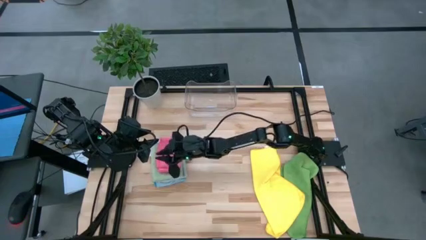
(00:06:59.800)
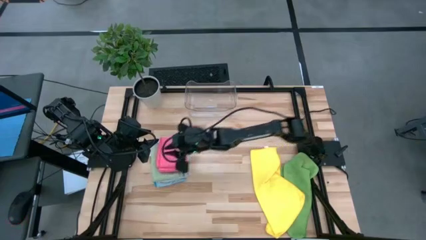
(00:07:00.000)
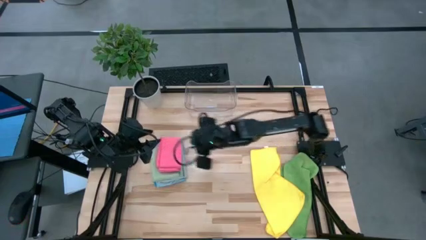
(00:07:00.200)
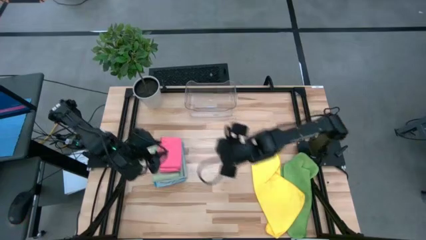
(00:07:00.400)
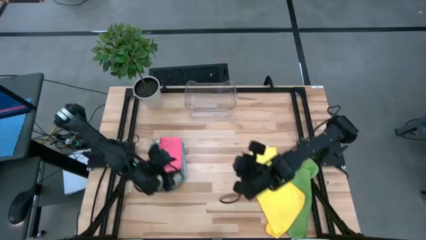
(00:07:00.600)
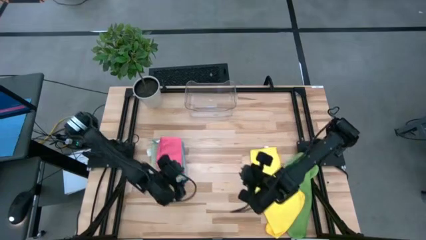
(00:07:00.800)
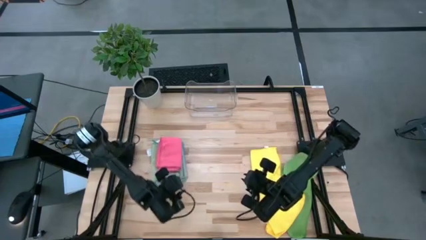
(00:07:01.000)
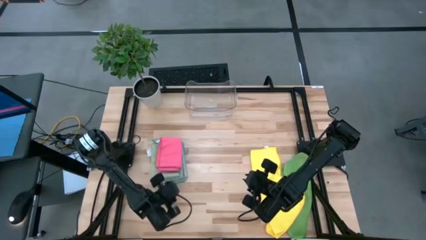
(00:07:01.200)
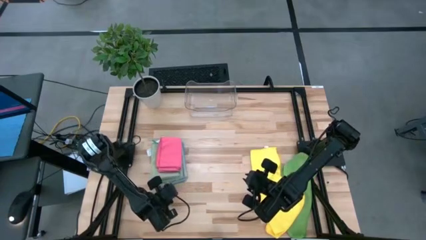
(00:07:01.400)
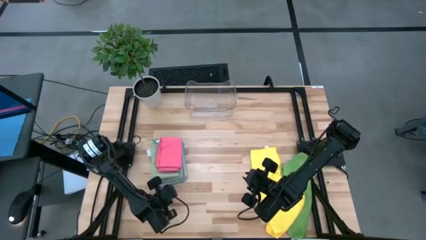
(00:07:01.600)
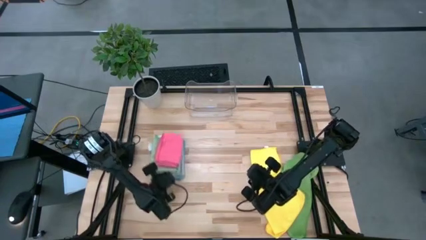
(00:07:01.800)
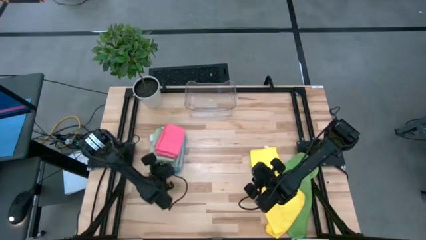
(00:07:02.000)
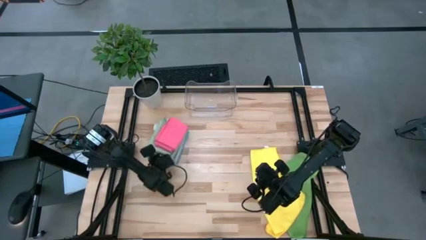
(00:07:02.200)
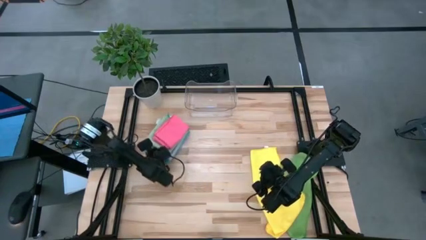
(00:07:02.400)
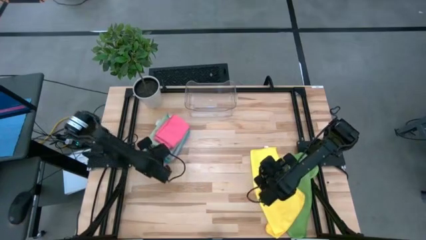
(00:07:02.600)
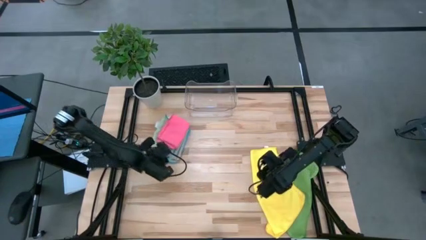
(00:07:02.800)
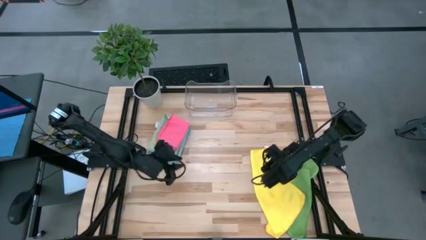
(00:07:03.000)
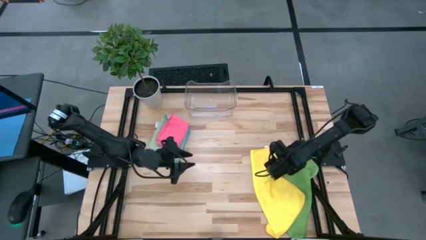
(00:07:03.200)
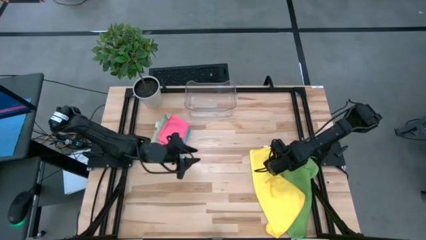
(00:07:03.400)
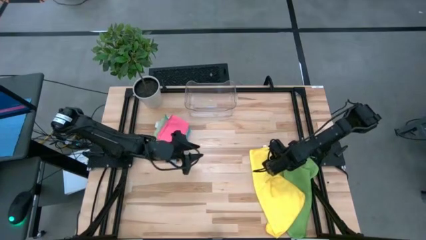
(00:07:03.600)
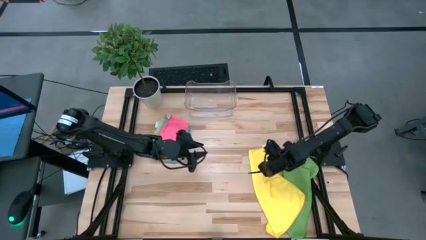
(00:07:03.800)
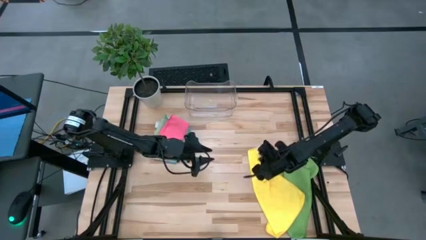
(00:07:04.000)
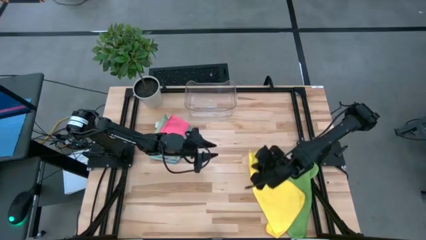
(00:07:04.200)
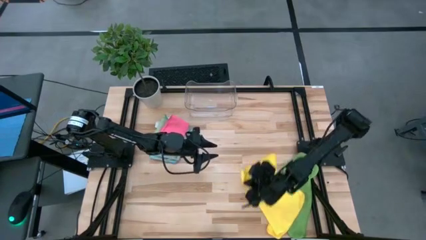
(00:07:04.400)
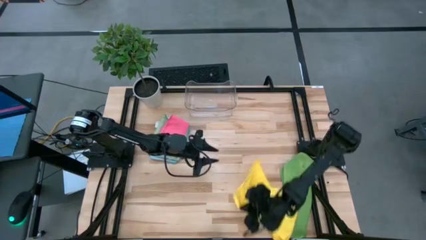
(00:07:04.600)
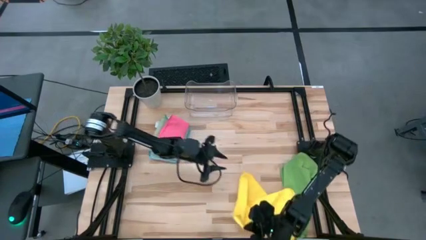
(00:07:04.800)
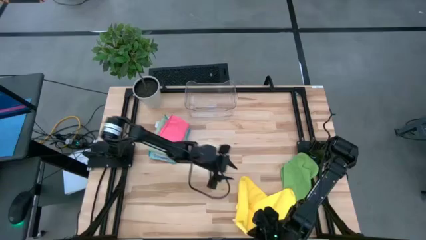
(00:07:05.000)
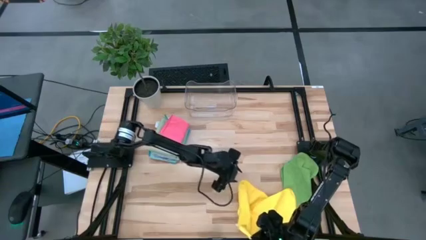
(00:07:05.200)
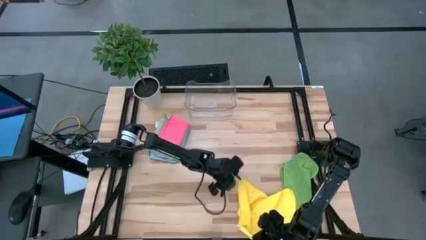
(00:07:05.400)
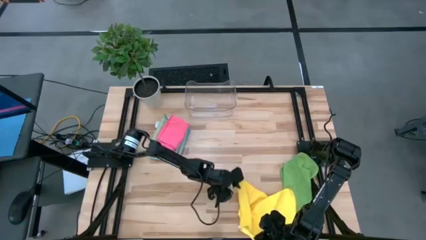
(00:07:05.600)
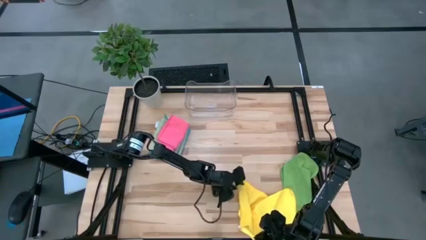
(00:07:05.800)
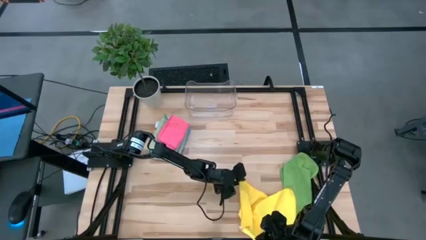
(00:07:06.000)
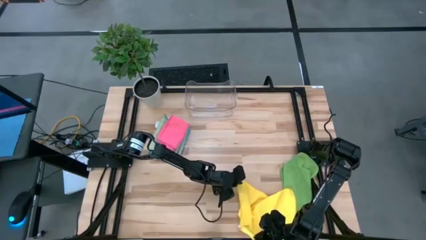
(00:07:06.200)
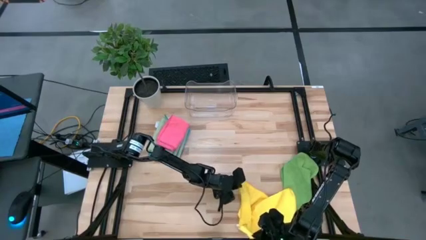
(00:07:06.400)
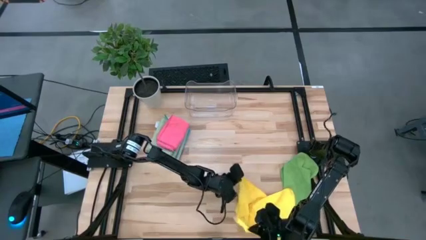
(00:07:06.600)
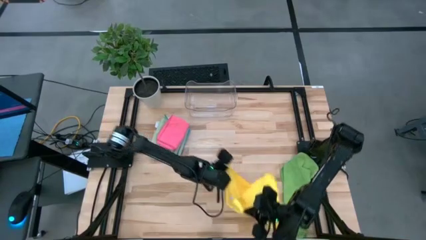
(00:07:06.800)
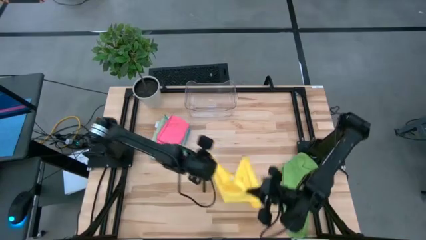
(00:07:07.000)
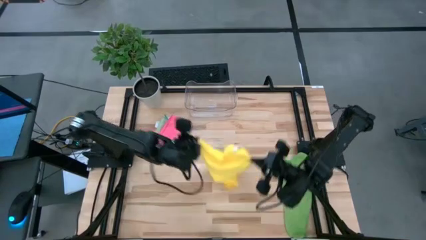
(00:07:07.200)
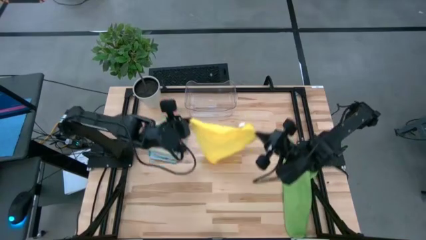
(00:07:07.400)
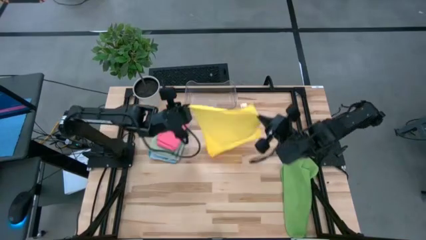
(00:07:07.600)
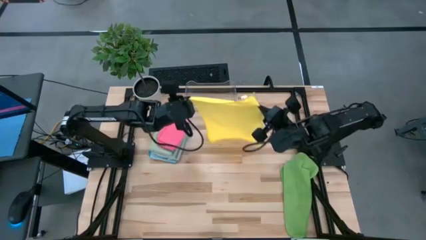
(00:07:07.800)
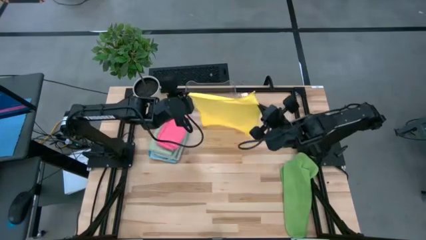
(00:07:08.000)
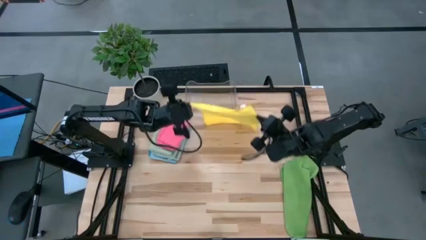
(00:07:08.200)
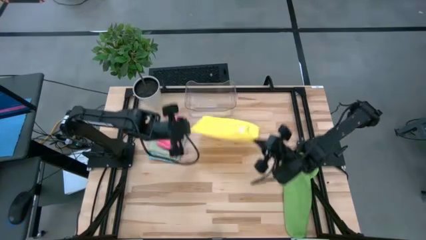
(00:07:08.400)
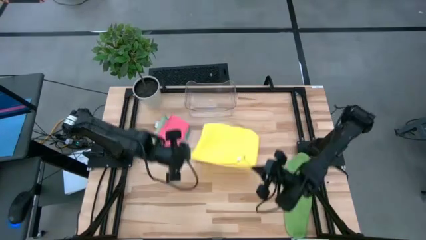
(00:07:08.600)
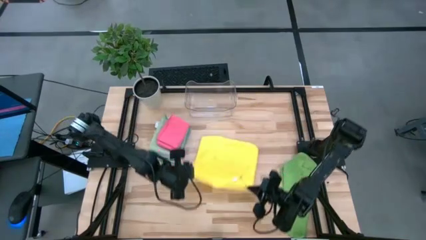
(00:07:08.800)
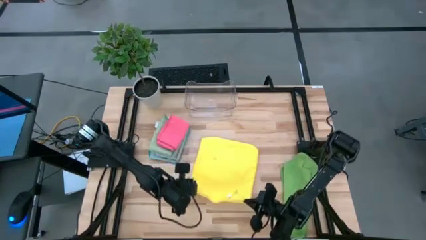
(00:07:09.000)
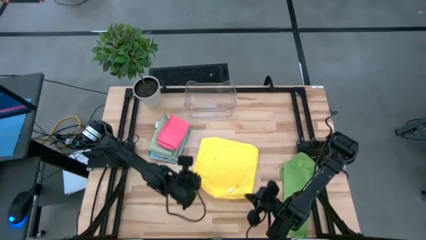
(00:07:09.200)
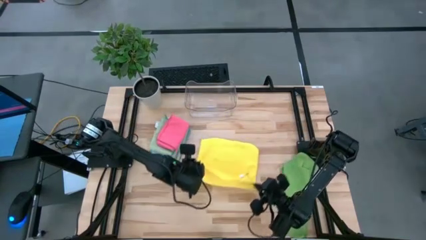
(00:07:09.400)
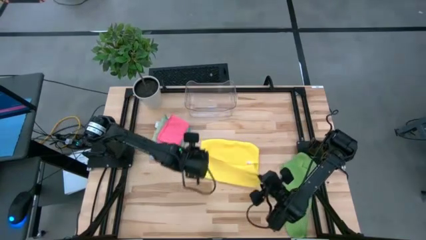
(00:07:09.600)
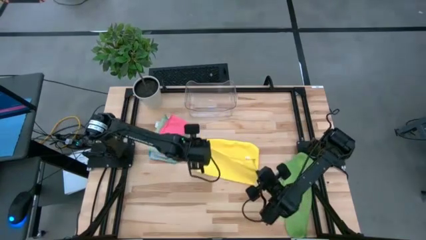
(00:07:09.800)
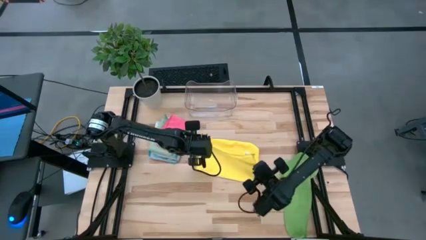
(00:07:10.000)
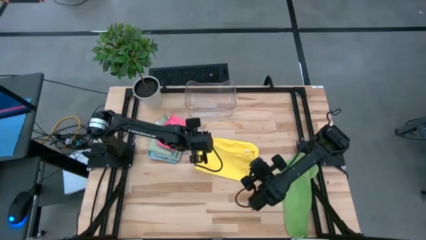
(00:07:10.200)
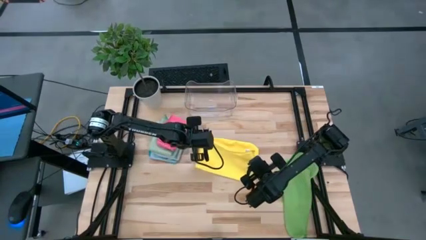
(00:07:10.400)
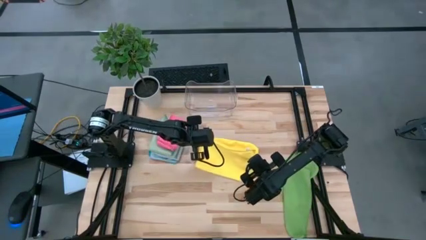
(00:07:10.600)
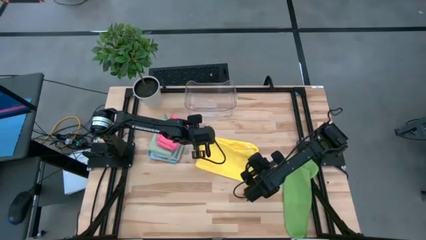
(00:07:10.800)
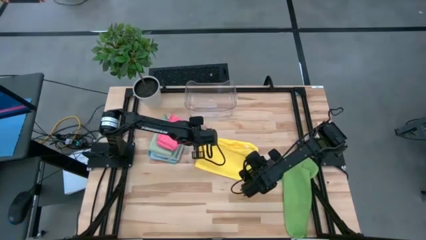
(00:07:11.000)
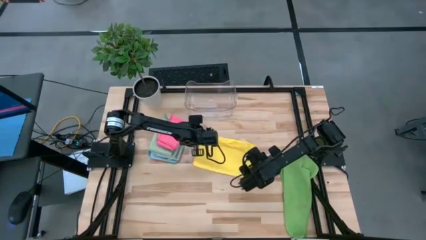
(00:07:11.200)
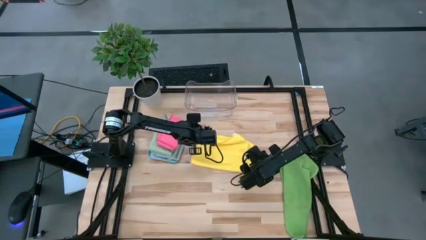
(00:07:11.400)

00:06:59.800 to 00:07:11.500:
Task: Fold microfiber towels
Fold the yellow microfiber cloth
